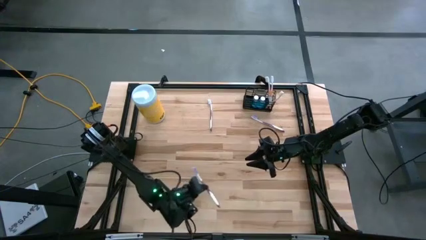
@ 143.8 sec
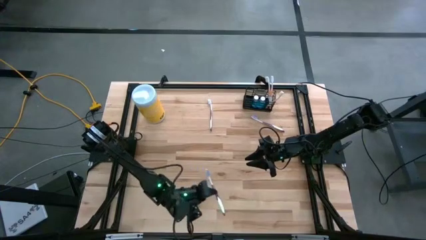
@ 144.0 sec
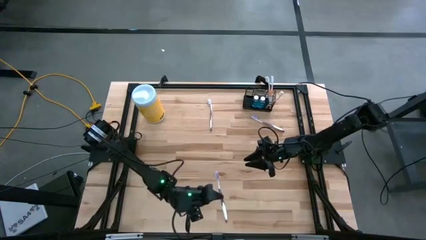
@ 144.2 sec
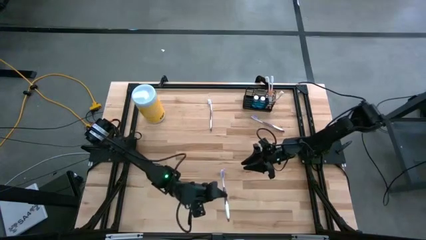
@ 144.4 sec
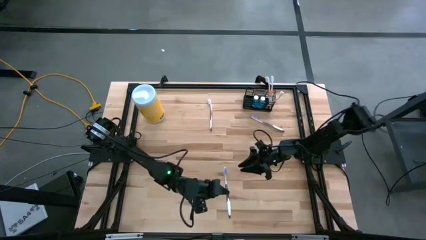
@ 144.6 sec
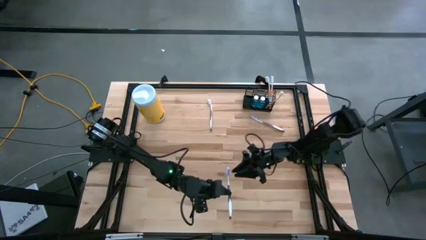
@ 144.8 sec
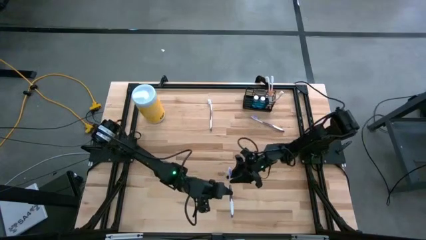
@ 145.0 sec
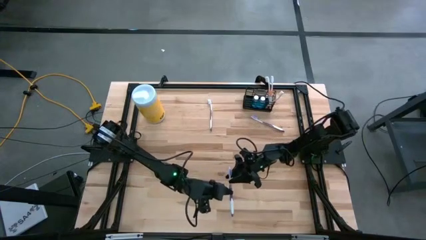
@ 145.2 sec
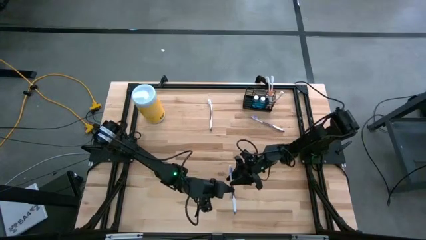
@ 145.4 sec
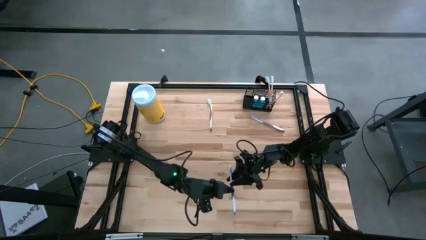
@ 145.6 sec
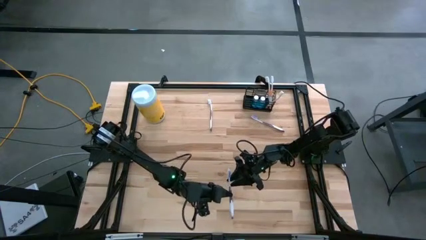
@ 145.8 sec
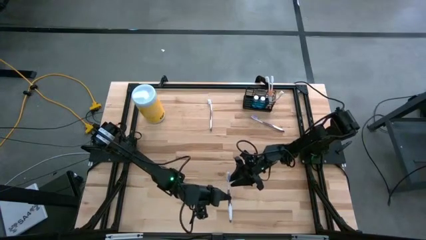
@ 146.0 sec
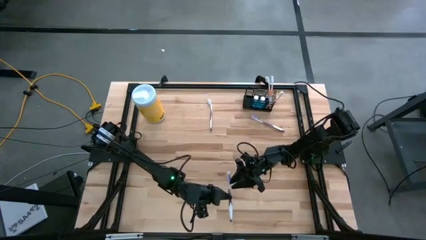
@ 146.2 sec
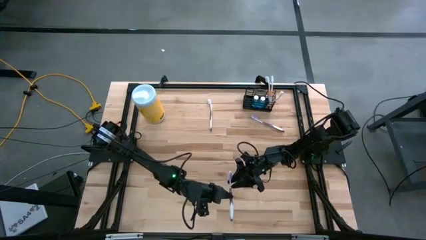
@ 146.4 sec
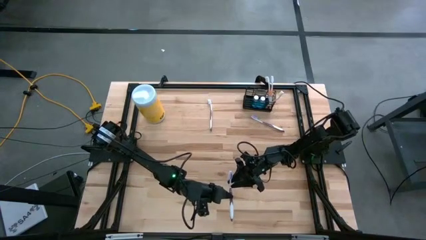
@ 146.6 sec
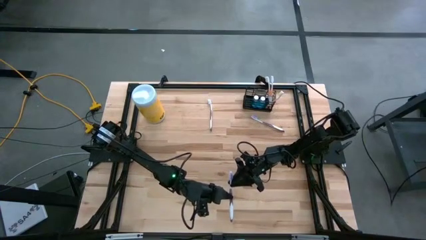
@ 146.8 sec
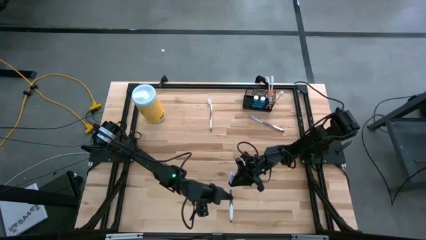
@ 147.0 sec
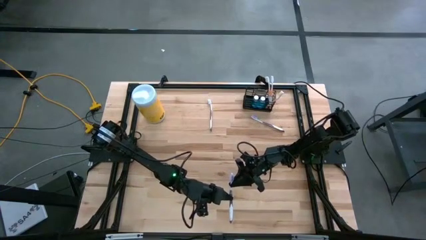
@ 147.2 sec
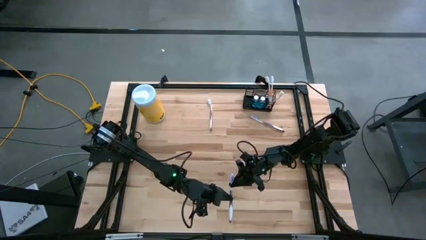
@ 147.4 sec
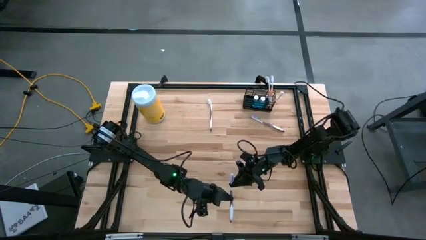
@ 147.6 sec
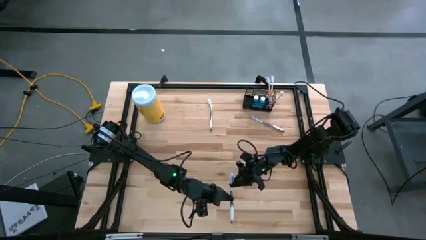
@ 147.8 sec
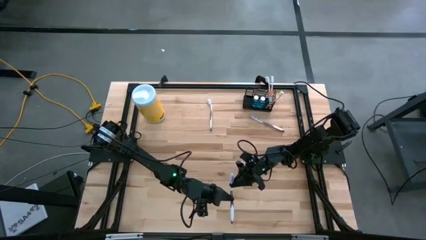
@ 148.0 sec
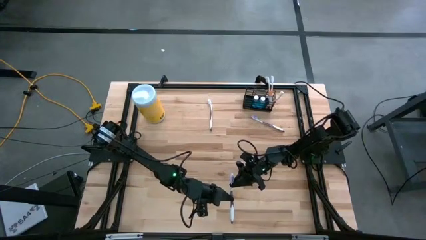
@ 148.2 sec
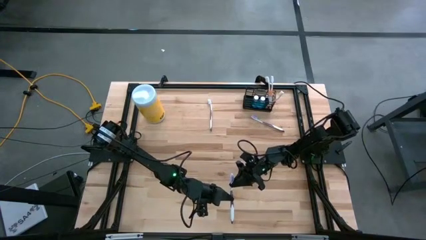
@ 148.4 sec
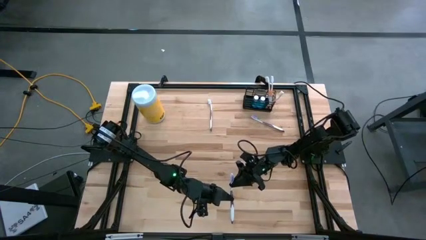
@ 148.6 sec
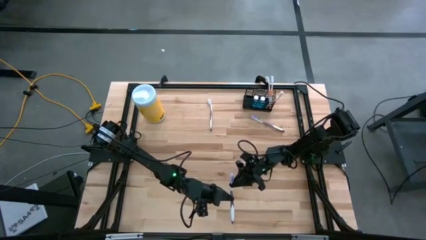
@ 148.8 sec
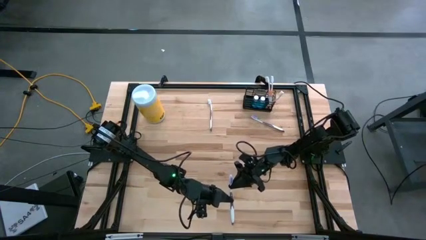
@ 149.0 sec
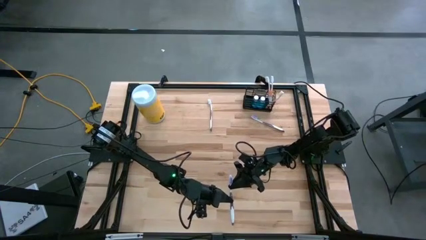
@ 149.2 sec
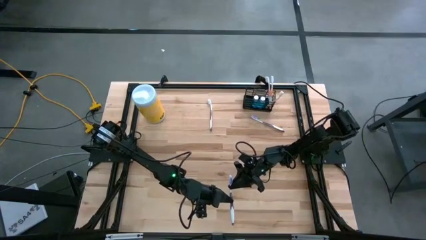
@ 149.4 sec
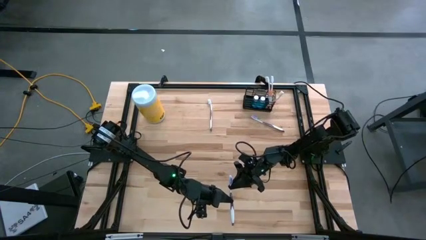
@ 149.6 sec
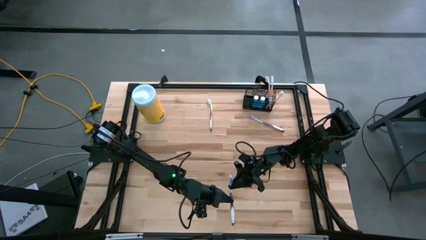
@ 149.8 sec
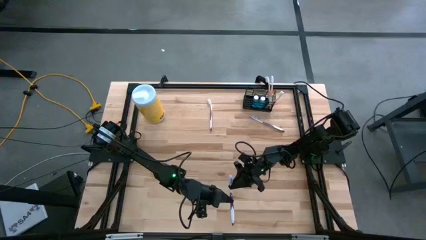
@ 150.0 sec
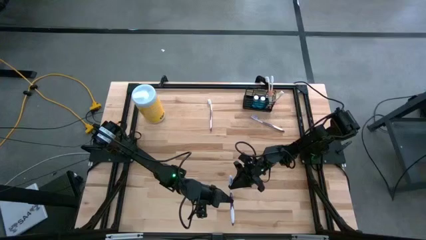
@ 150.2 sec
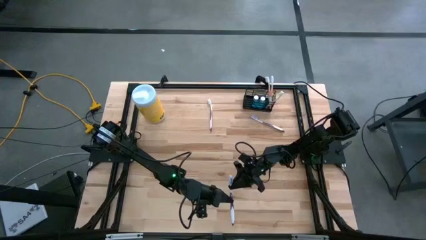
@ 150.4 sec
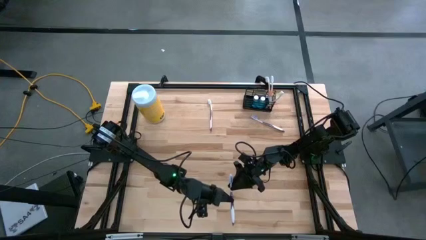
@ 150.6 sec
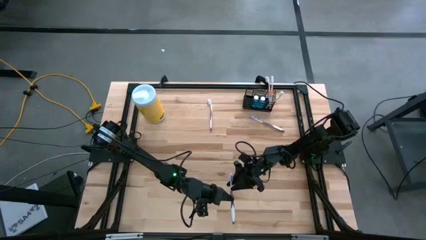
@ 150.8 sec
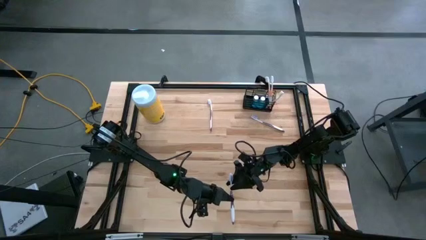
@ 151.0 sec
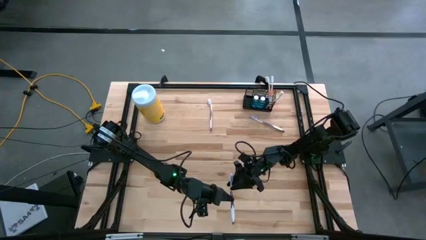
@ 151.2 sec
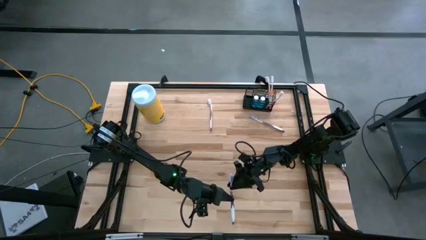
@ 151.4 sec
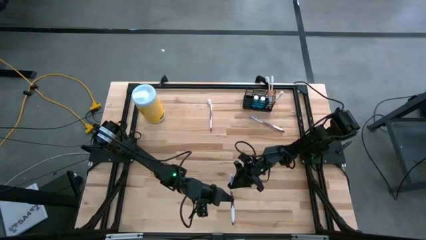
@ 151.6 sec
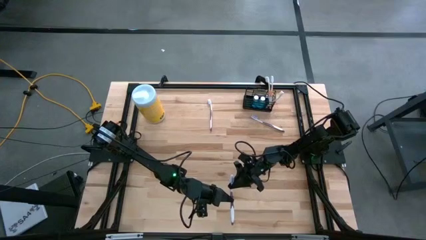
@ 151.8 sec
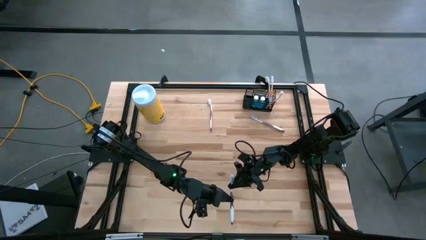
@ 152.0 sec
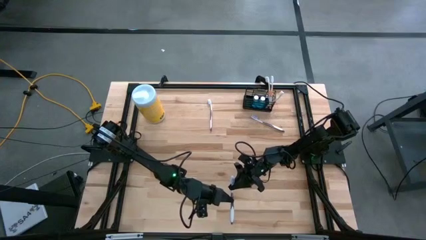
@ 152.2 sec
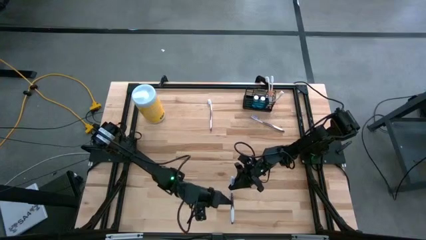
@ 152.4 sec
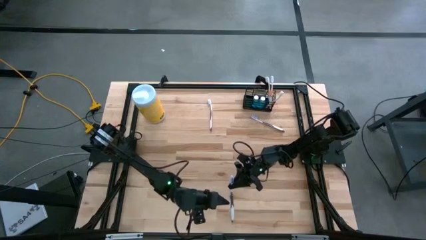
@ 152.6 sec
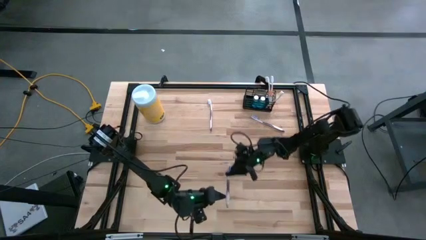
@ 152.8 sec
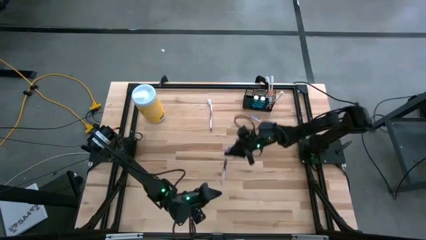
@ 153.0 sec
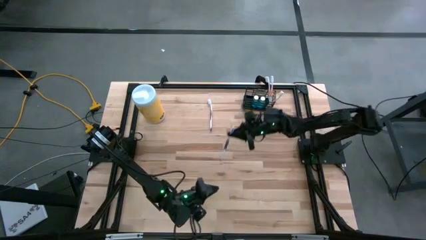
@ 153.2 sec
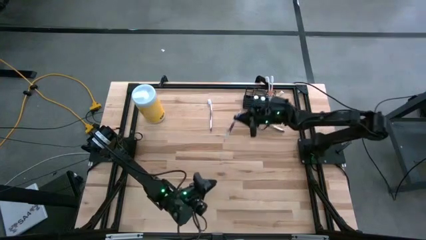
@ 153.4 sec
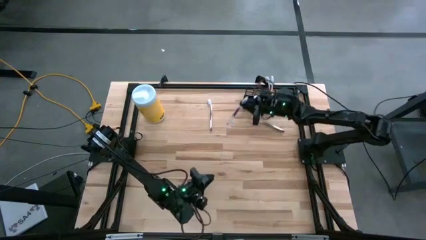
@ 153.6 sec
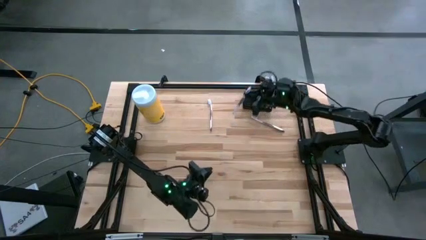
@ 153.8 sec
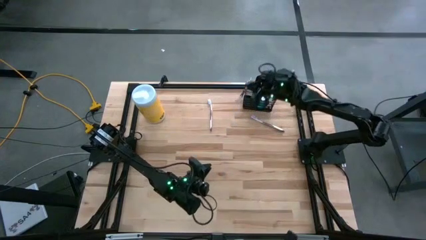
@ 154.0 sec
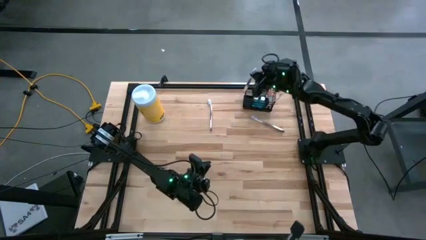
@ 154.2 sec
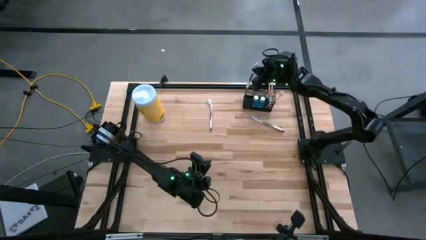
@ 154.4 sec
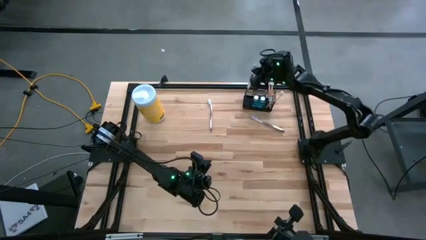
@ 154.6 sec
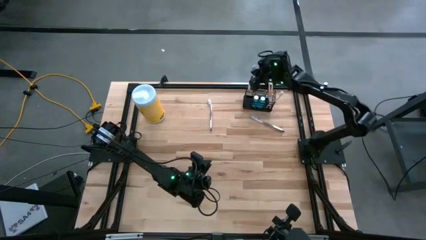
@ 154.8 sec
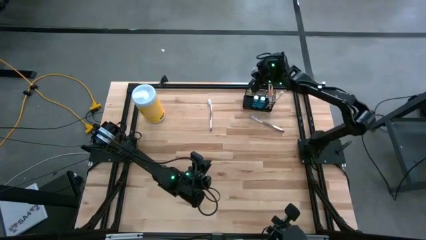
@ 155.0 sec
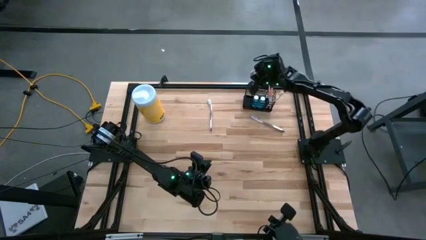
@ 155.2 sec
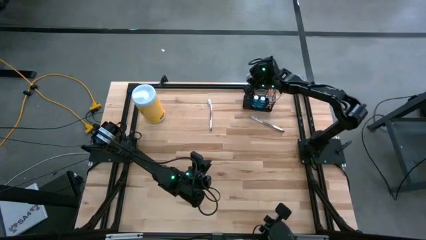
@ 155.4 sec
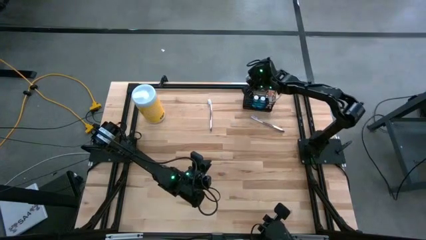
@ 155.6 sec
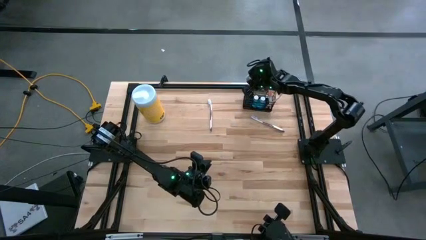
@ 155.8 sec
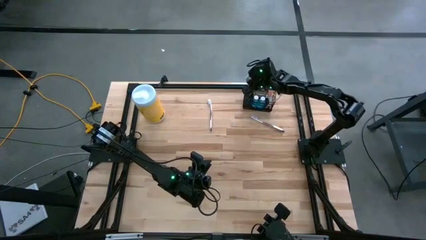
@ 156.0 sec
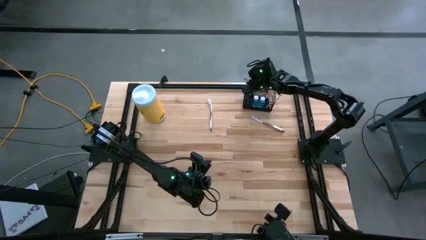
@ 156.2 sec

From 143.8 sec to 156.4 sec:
Task: Pick & Place toothbrushing station
Put the bottom violet toothbrush into the left section of the black wire organizer

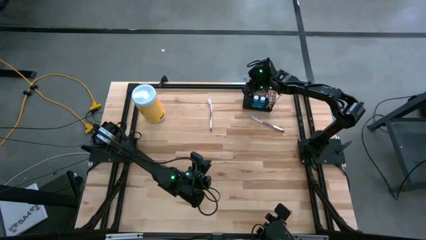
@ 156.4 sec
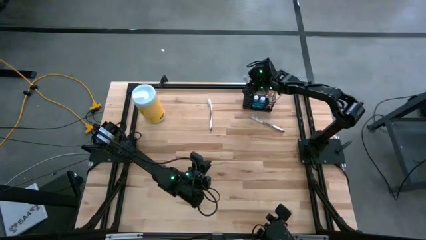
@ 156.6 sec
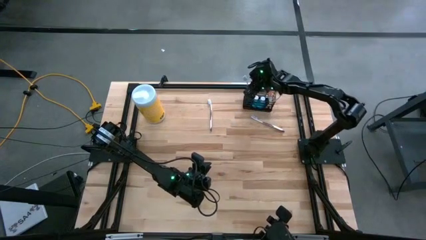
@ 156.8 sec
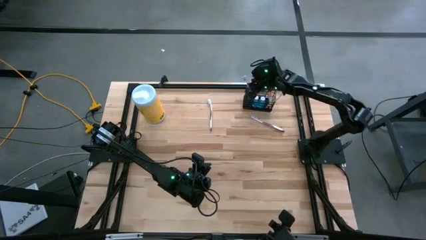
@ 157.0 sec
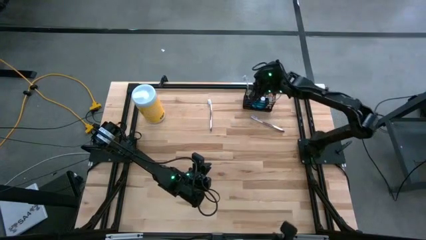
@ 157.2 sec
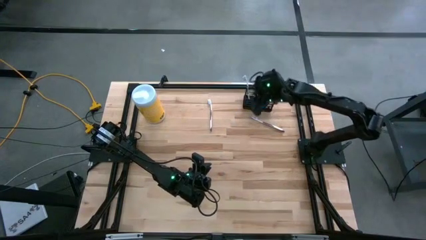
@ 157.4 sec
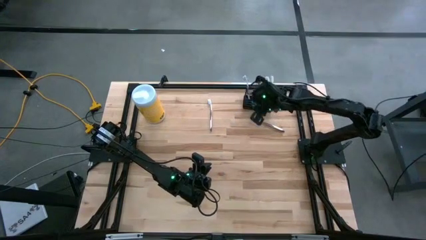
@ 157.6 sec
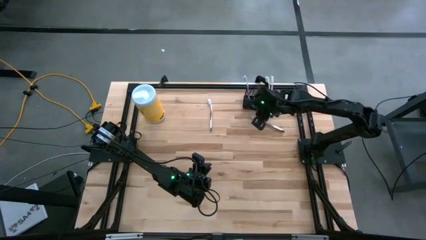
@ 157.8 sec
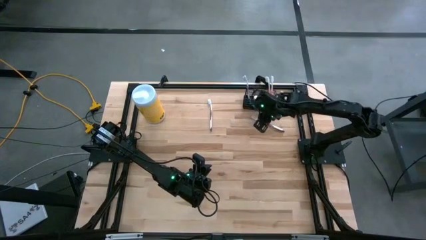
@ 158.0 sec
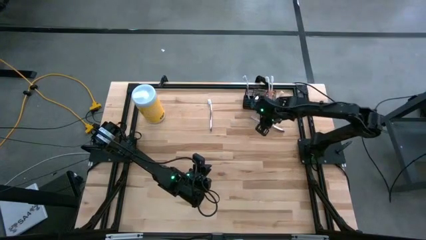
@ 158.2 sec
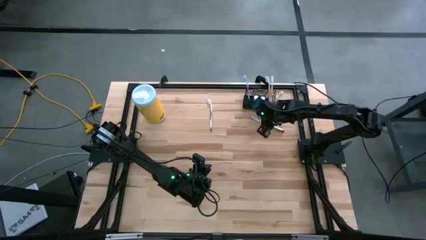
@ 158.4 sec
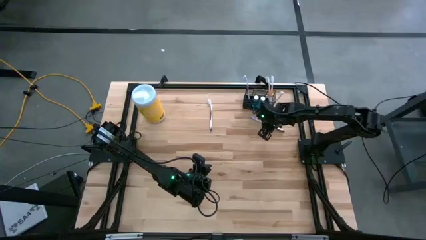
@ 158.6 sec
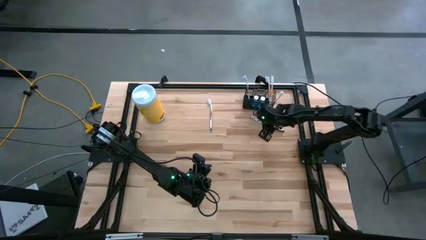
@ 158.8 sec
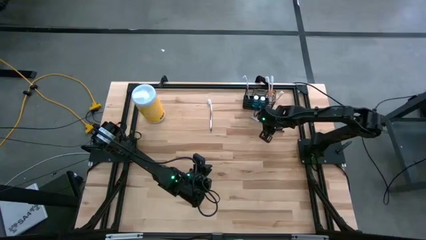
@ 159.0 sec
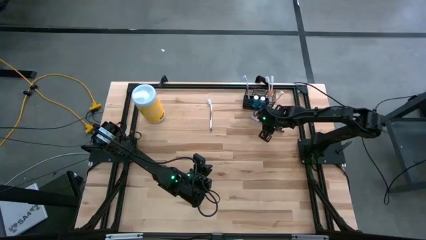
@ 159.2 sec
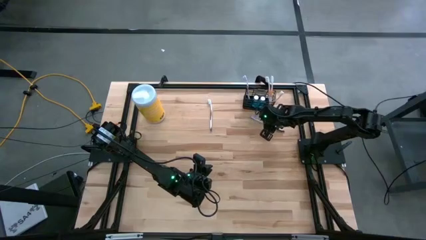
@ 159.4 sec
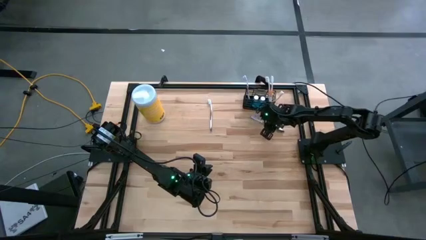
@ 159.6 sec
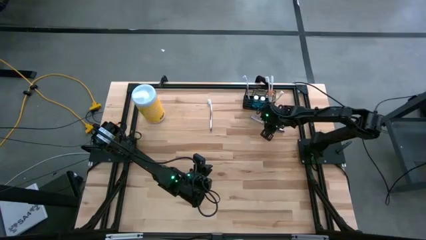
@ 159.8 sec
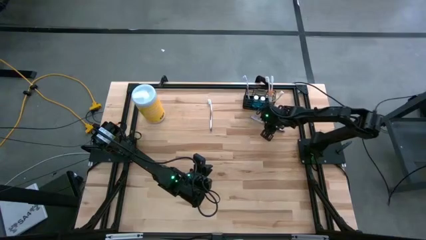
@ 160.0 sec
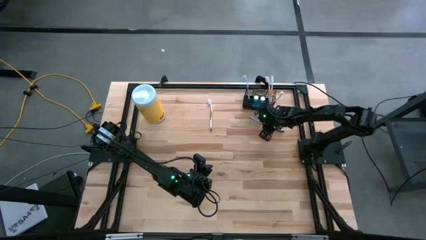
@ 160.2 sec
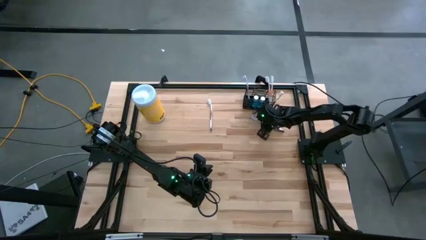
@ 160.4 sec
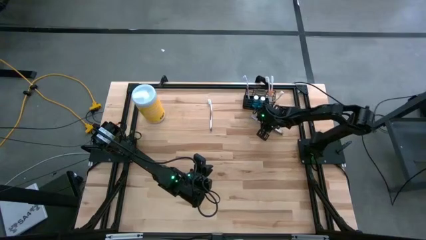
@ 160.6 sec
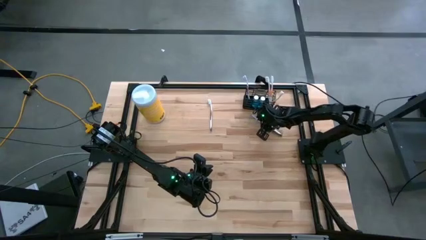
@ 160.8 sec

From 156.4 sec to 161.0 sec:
Put the right violet toothbrush into the black wire organizer
